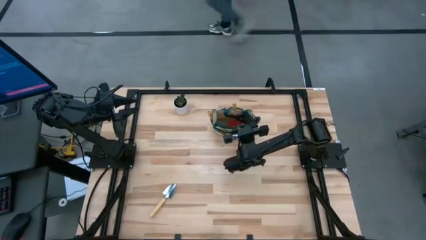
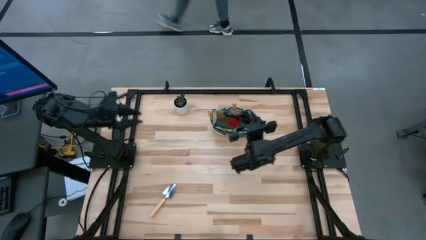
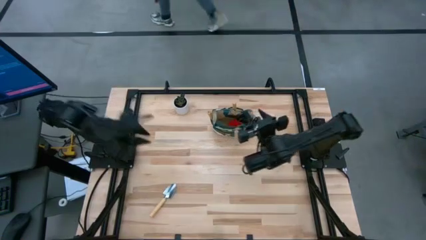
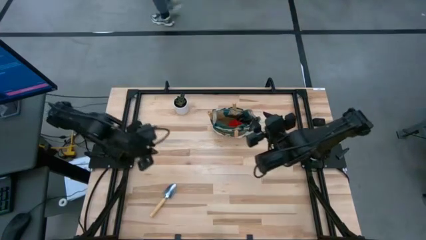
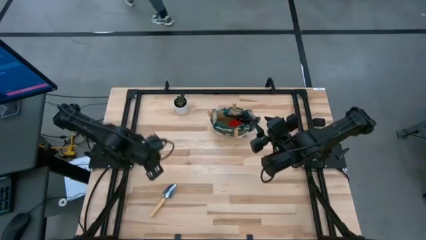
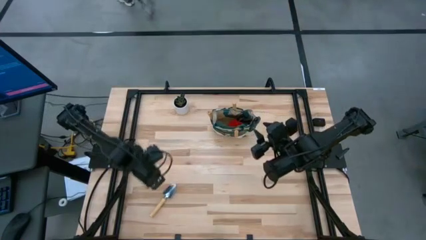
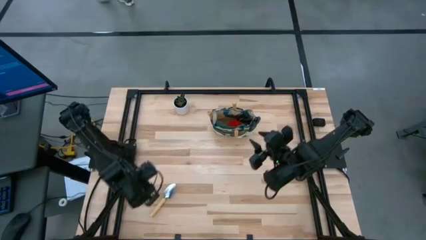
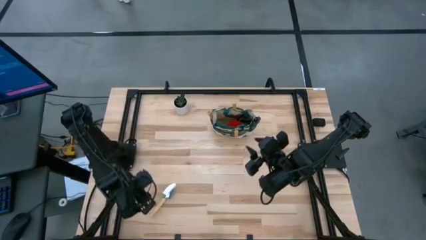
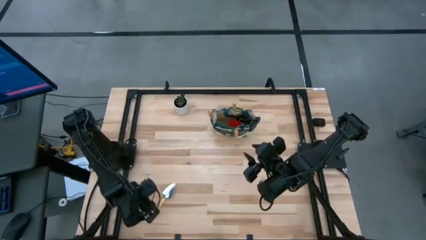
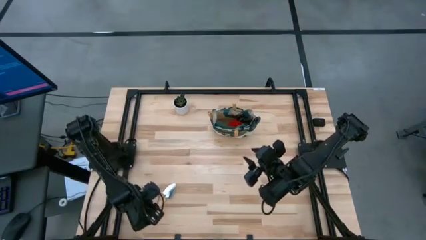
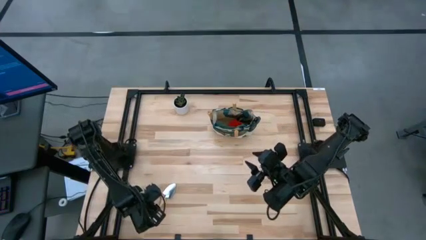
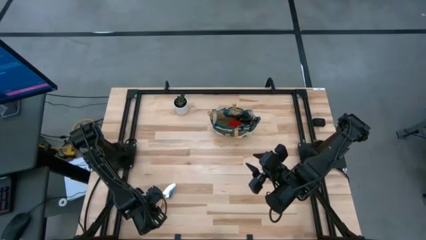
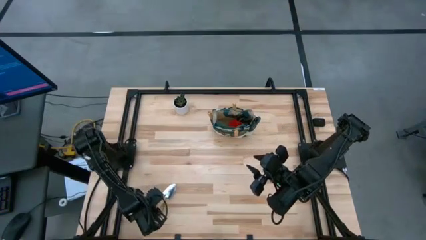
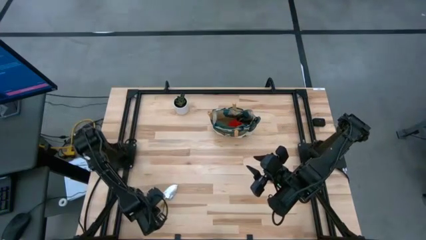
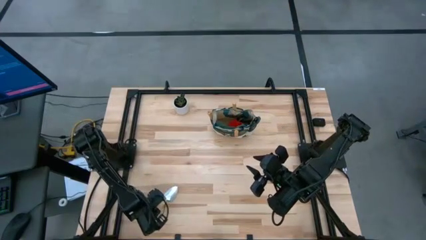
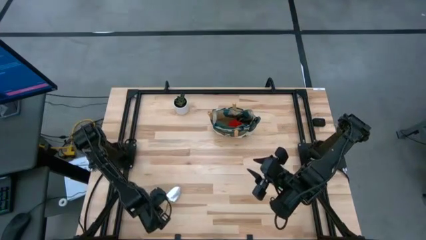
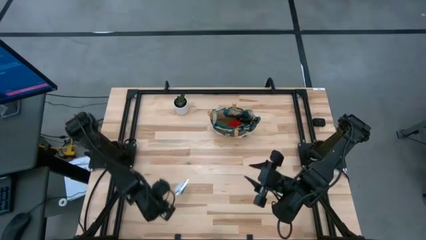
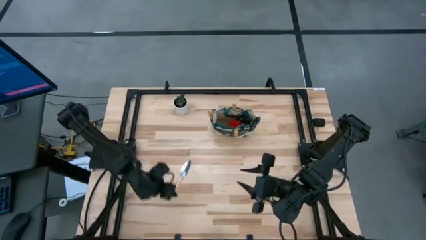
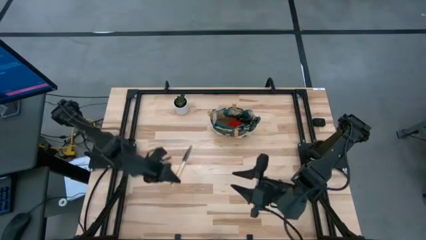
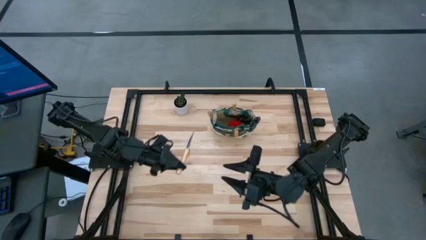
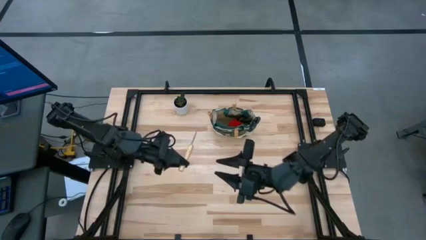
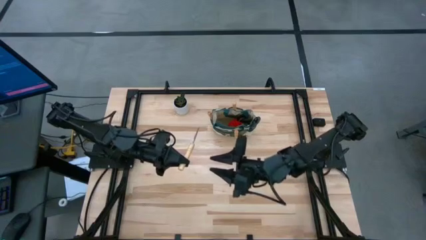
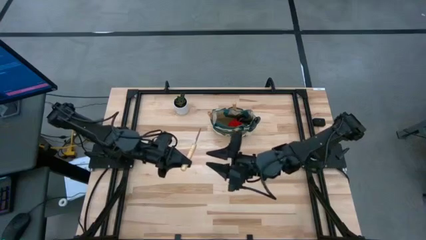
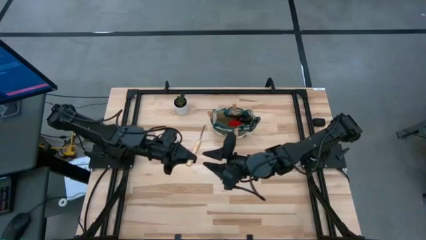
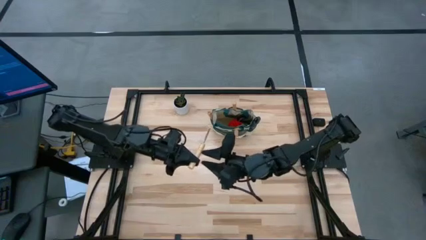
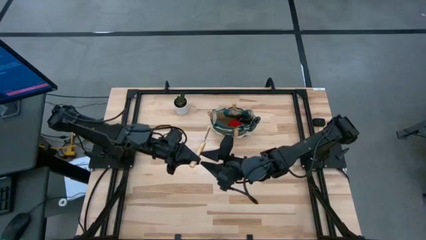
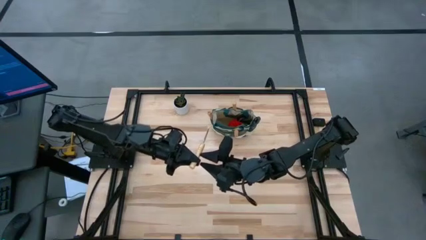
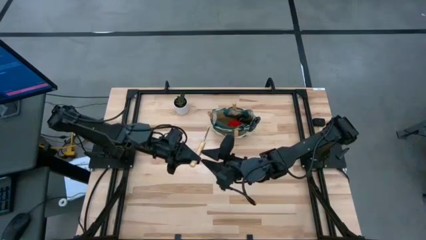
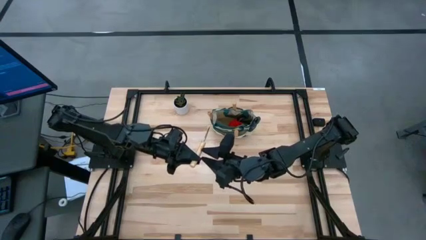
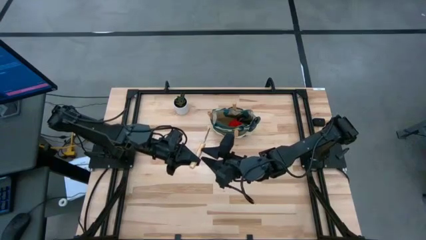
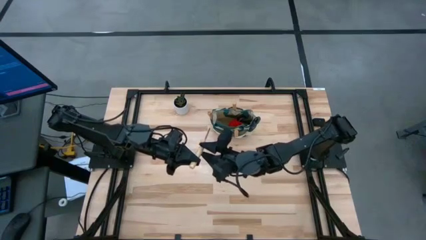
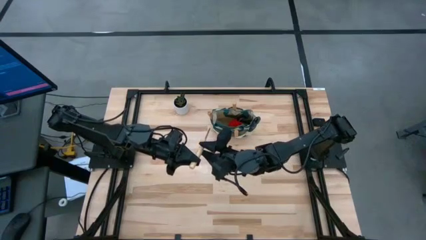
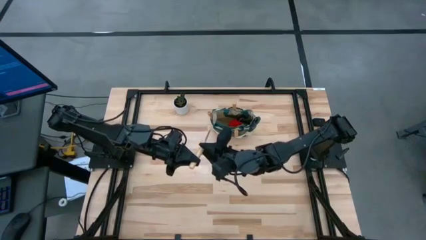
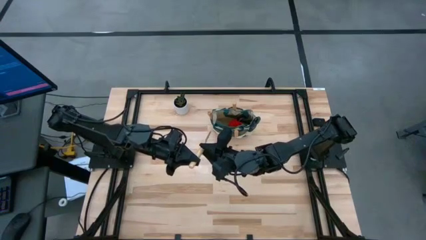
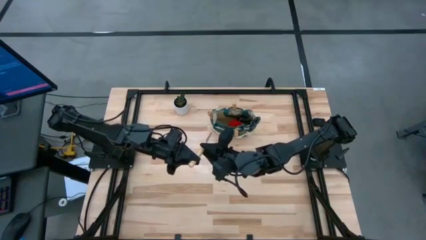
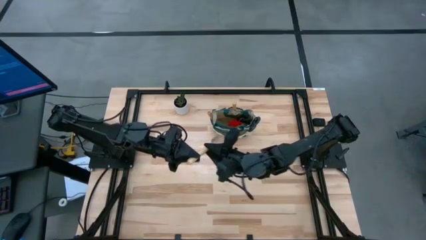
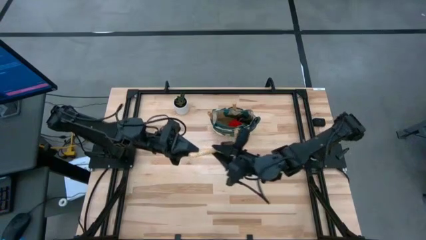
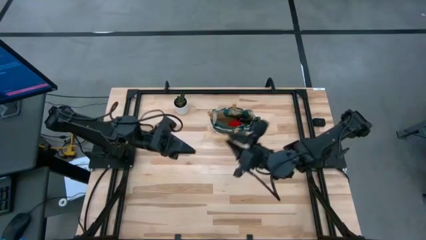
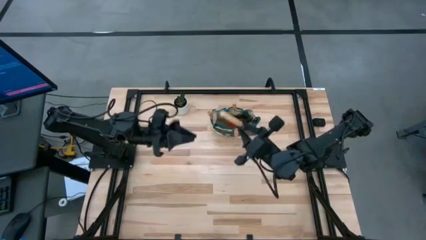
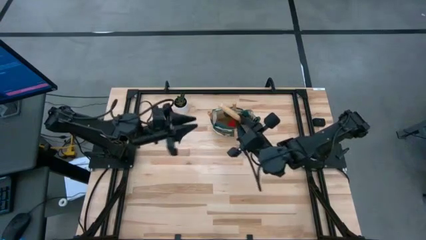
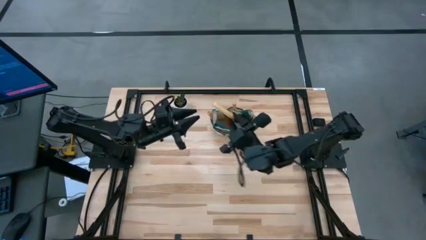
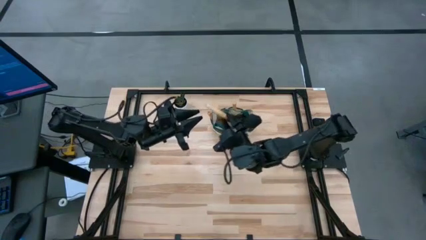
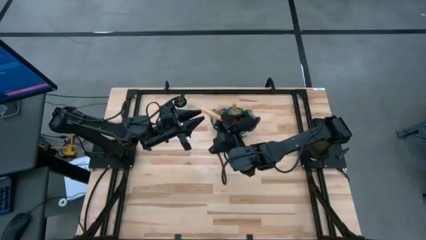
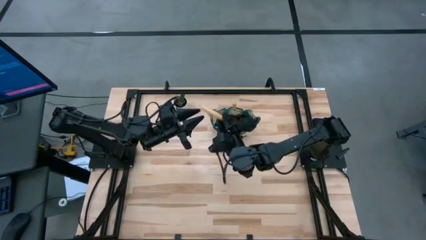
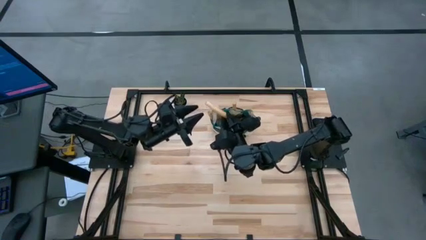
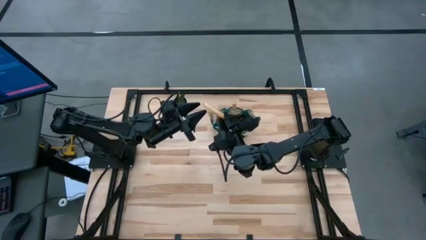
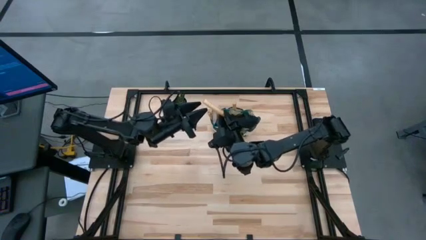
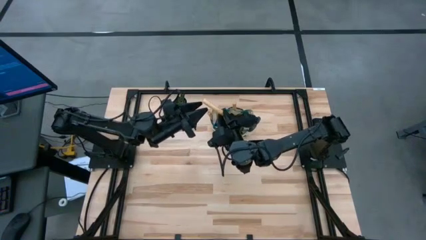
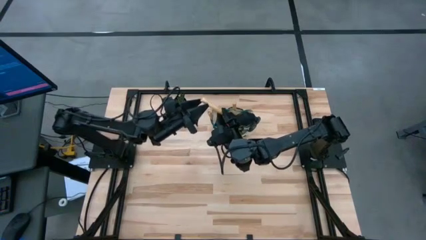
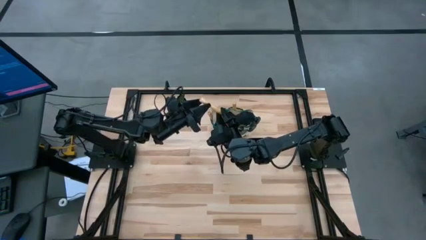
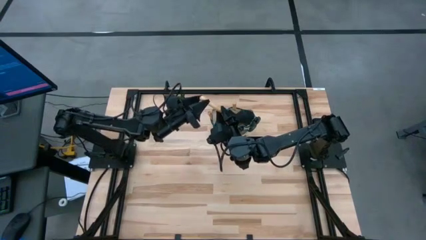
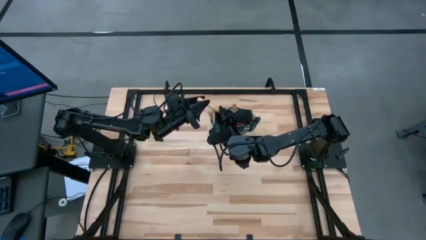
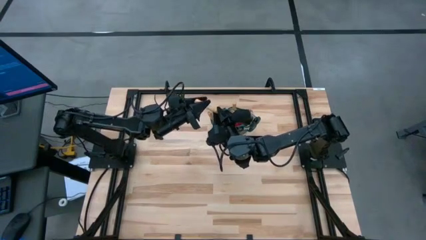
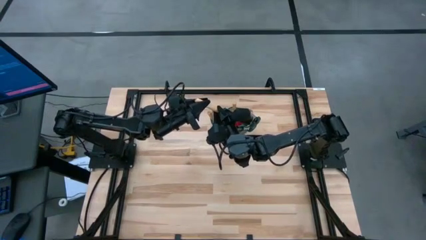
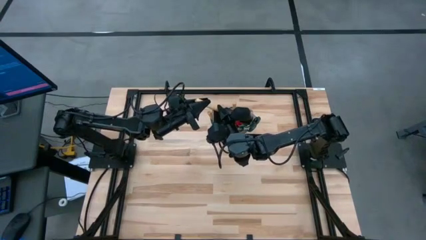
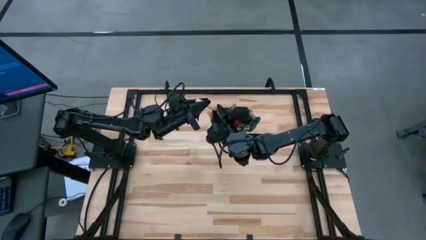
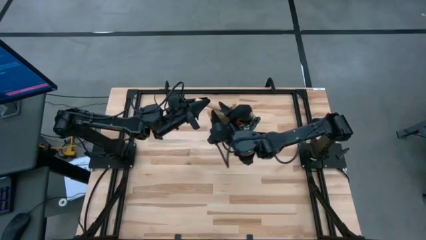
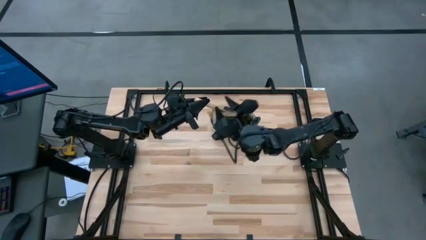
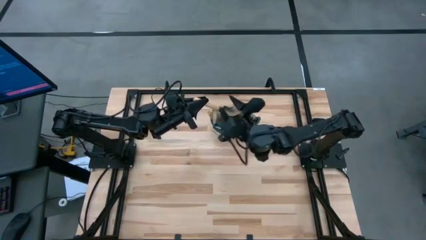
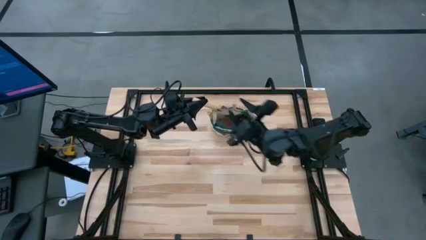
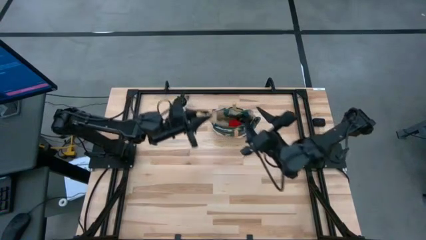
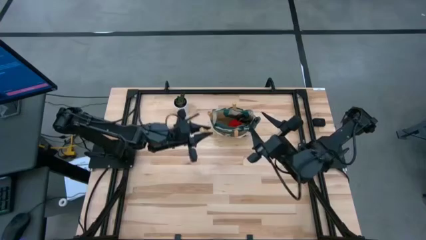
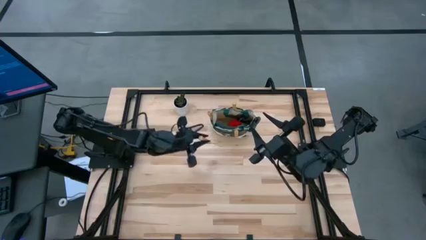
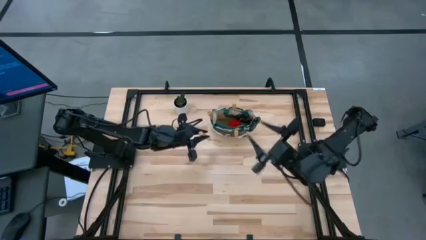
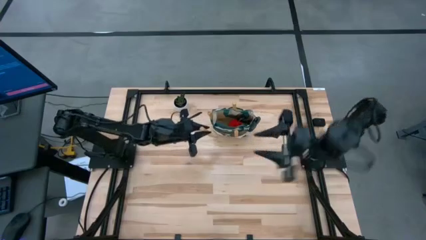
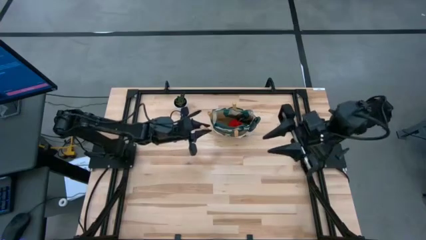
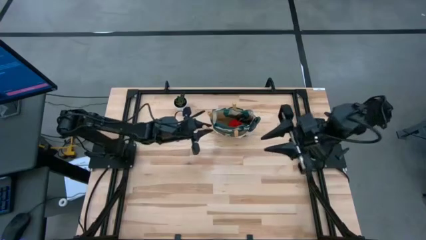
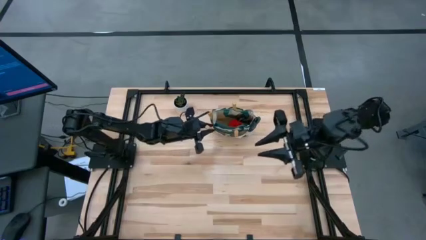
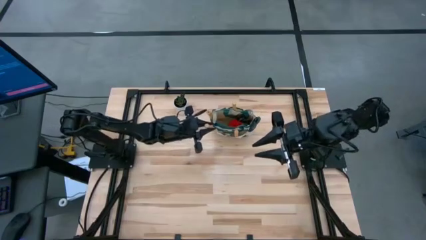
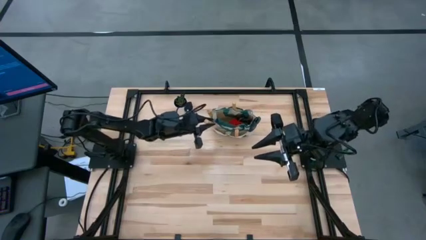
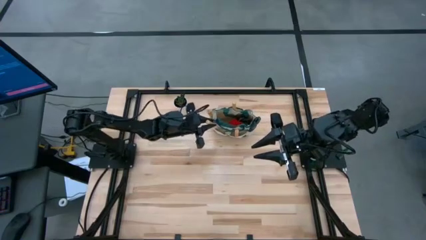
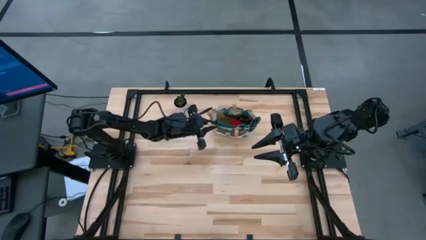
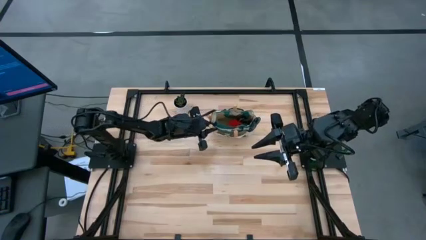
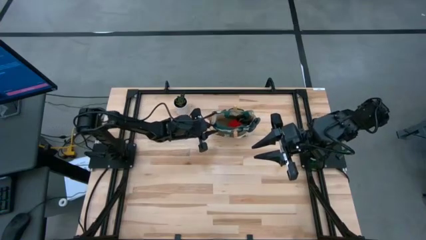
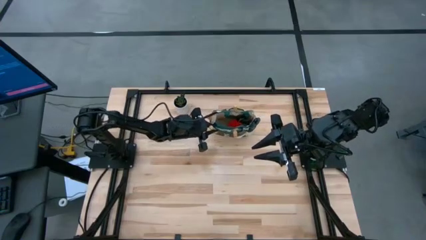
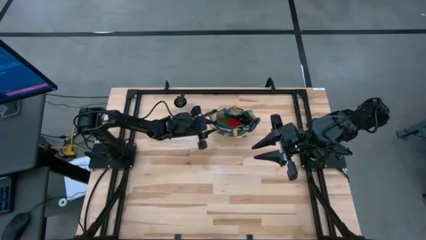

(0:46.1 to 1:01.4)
Task: Pick & Place Garden tools in Gardening bag
Put the brown trowel into the gardening bag
